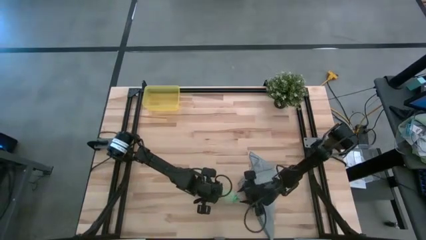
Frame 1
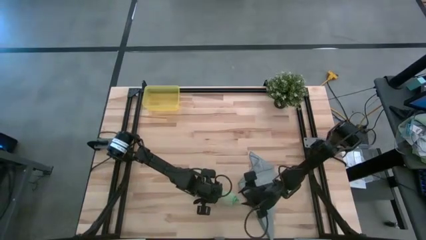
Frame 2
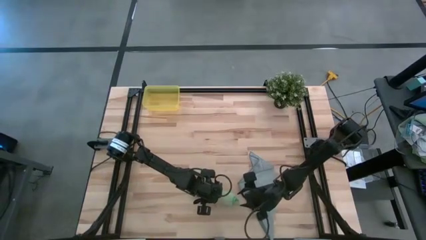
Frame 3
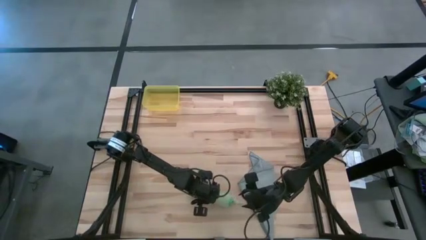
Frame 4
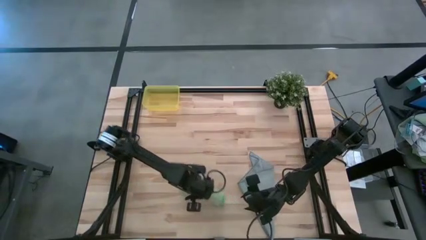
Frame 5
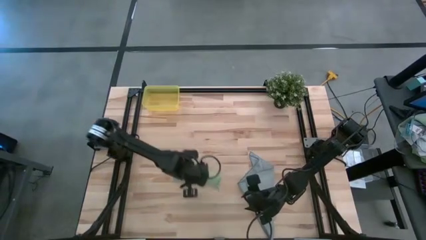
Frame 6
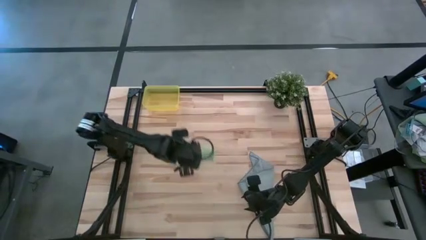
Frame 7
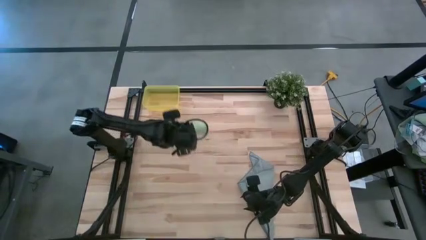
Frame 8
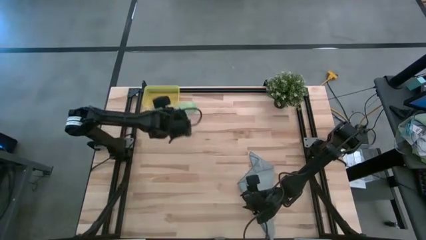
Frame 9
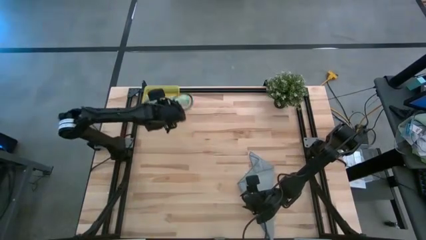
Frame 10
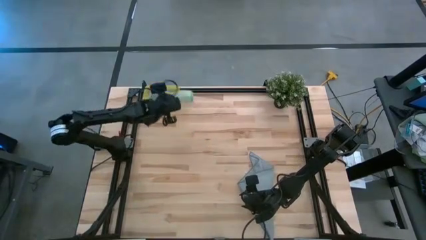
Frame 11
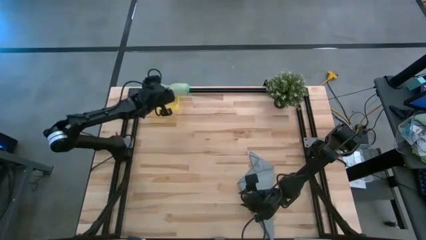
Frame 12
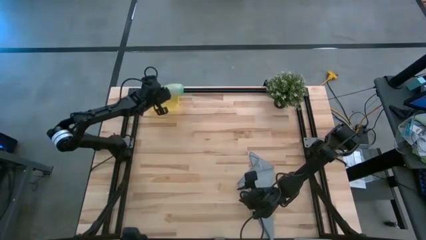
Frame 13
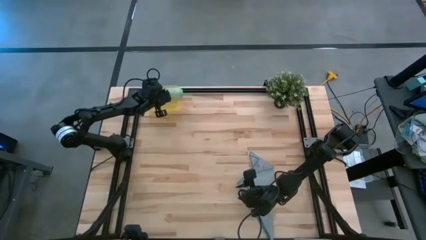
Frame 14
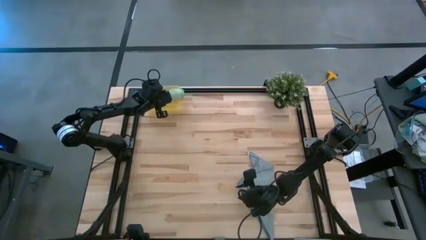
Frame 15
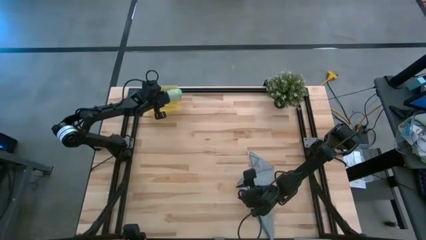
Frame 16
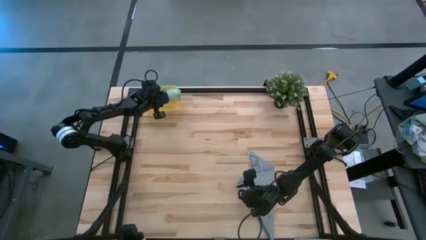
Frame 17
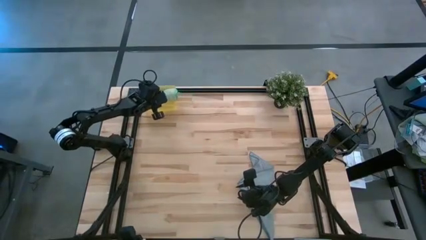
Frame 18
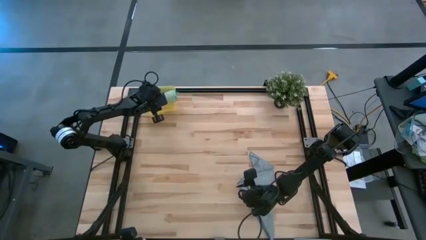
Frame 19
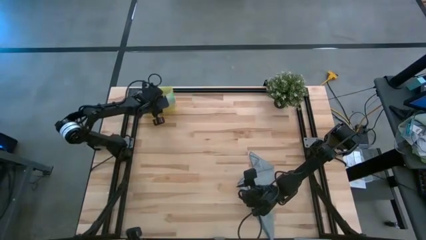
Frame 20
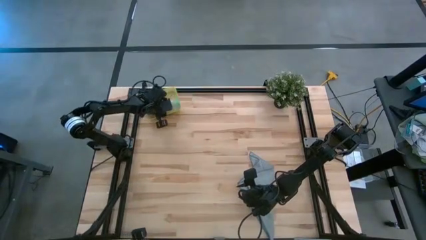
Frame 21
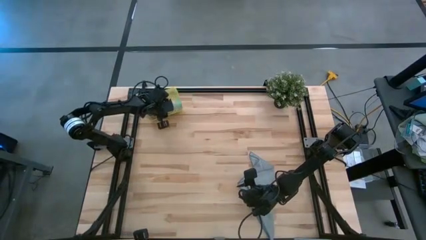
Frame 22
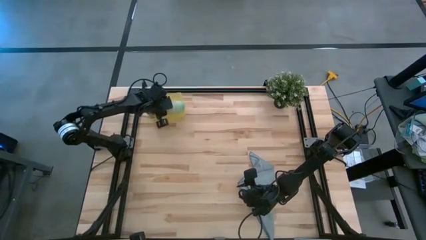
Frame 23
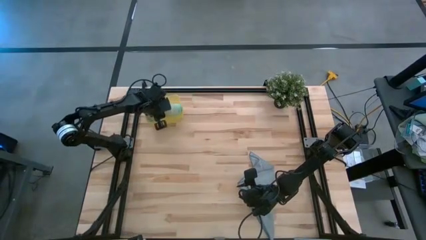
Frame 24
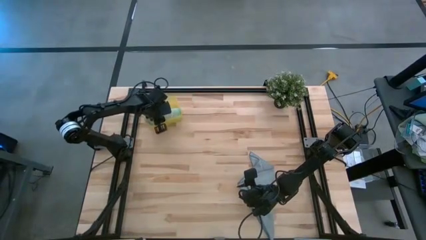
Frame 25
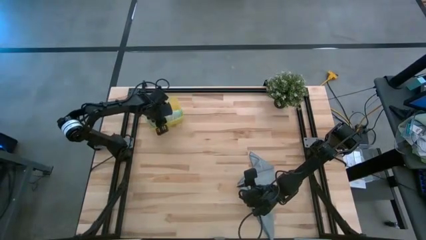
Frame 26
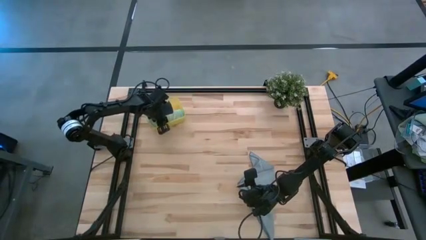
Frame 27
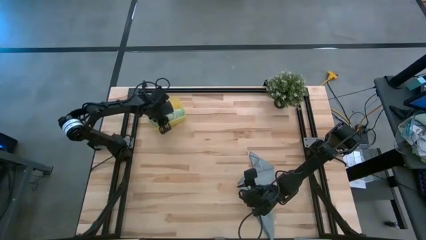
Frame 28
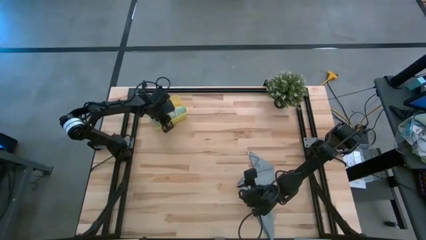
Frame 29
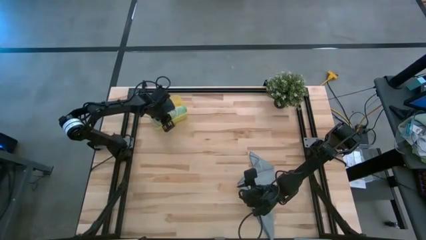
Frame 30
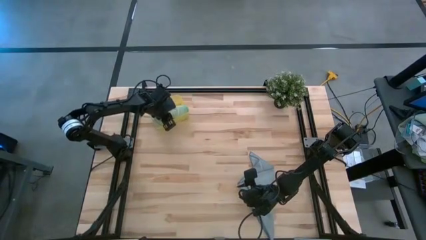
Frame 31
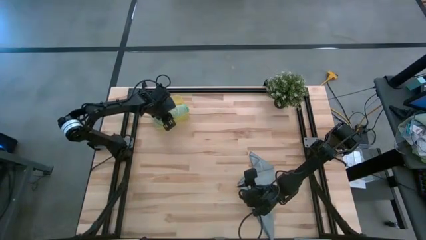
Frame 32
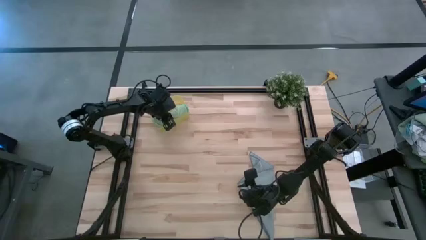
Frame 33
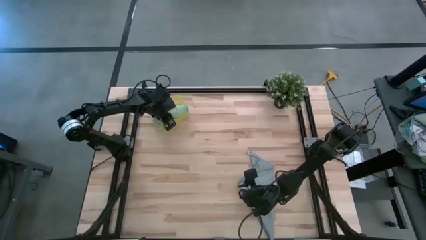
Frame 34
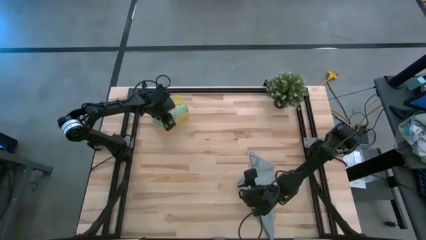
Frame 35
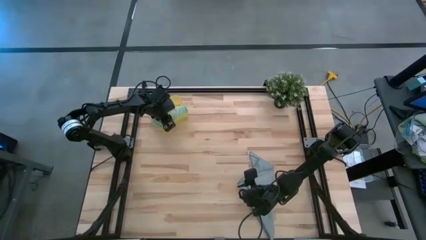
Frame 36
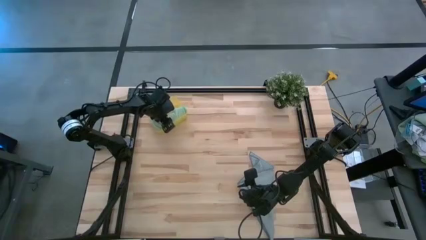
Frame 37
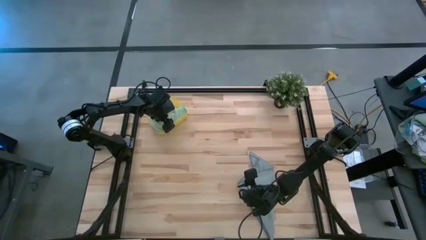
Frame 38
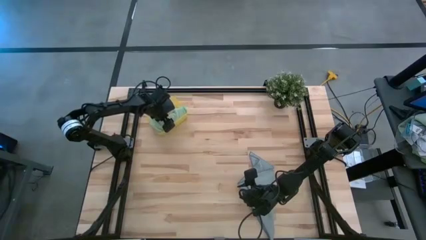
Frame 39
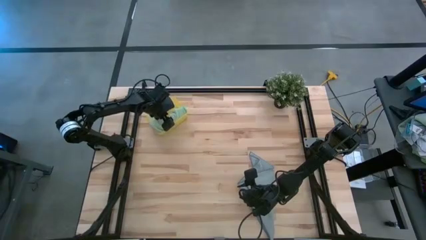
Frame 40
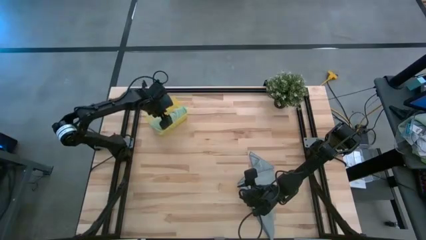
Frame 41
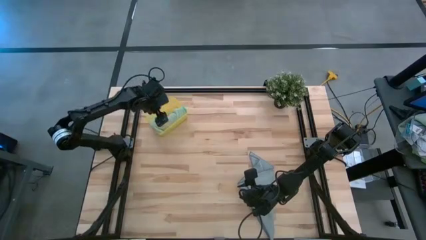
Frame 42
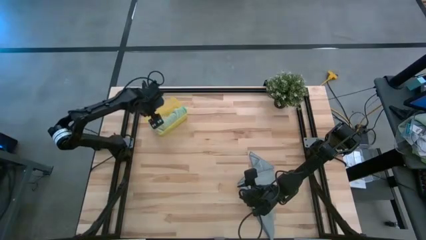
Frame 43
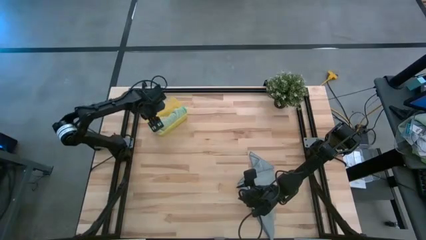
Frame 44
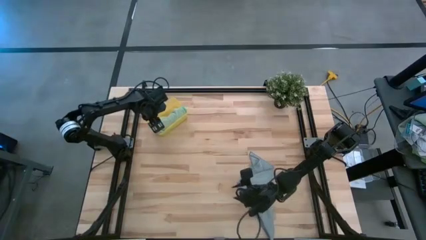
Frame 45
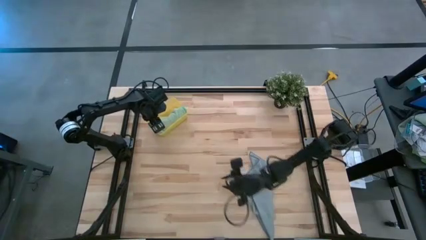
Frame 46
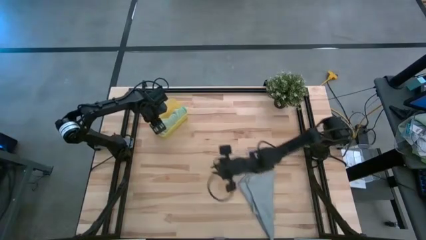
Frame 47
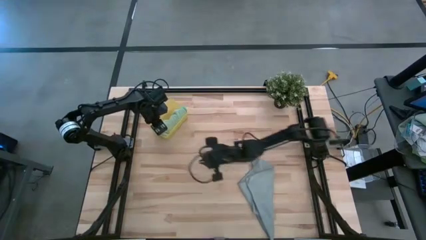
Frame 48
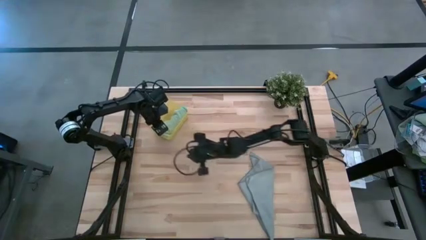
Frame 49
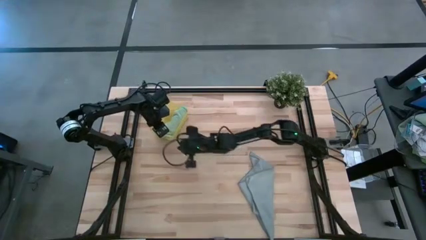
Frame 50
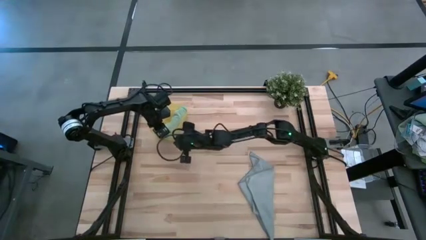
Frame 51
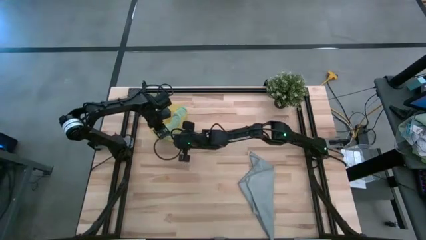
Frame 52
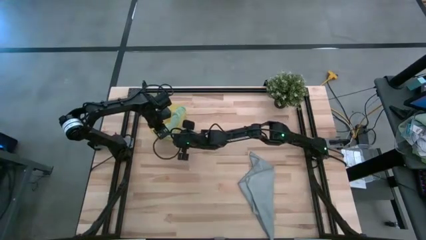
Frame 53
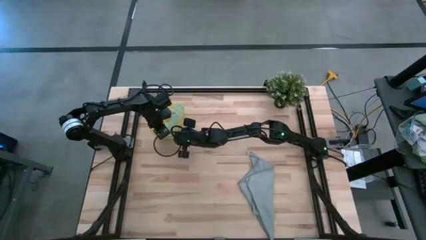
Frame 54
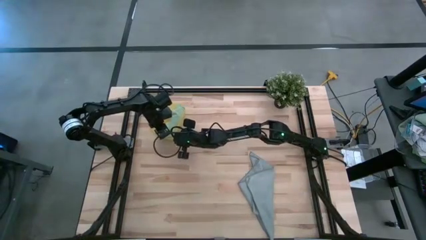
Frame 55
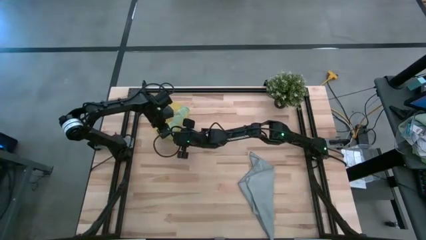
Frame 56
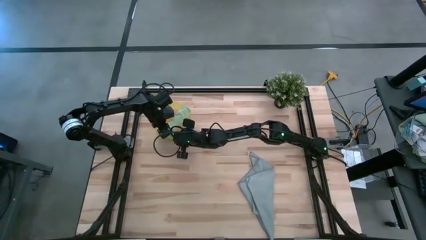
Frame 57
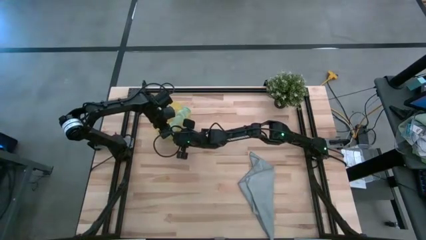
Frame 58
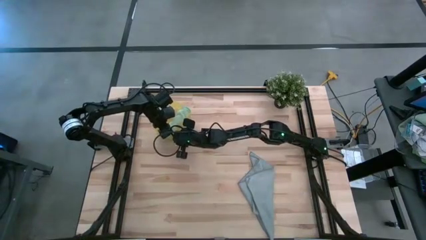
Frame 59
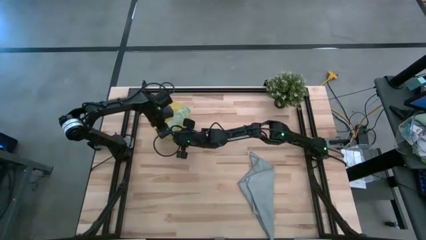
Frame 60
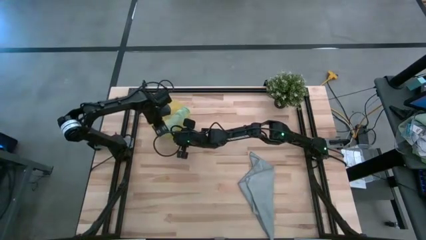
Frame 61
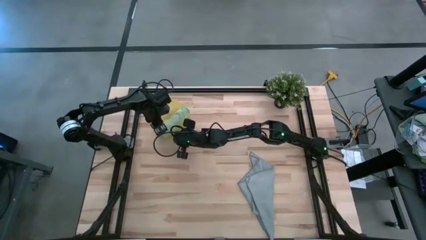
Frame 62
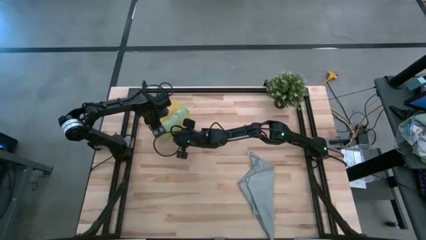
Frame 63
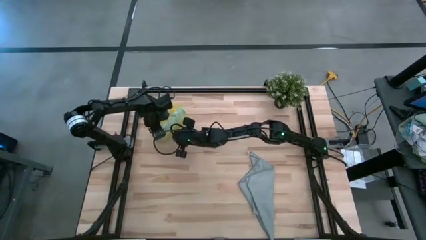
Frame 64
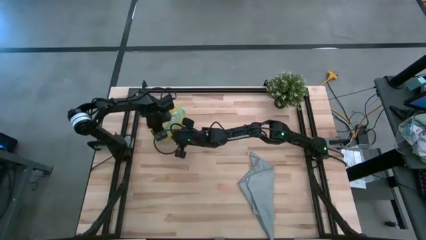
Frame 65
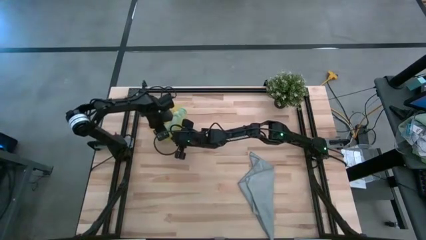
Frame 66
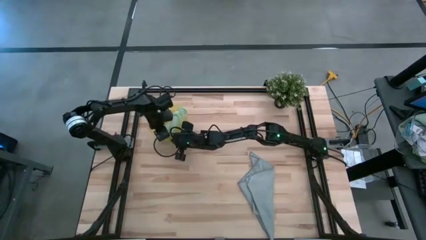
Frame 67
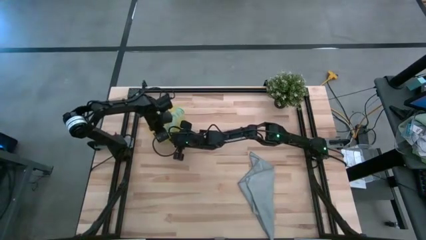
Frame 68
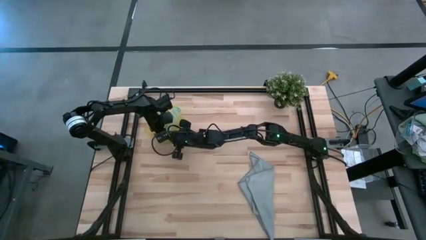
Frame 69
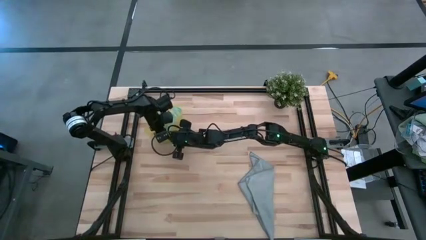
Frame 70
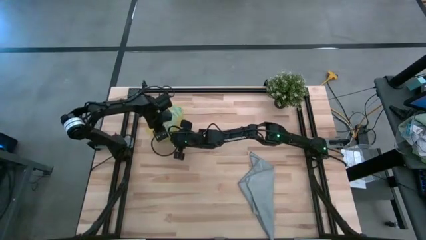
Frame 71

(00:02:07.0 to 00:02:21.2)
Task: Roll microfiber towels into tight, uniform cylinder then place into a basket
Put the rolled green towel into the yellow bin
